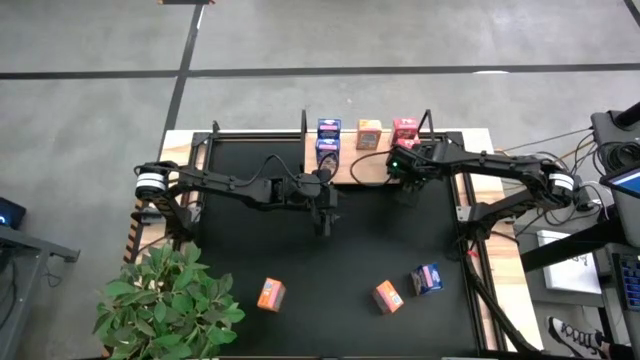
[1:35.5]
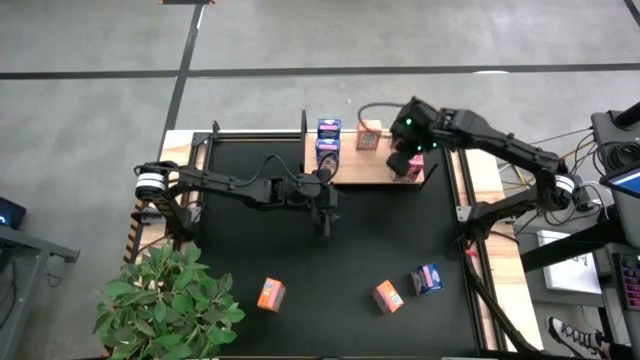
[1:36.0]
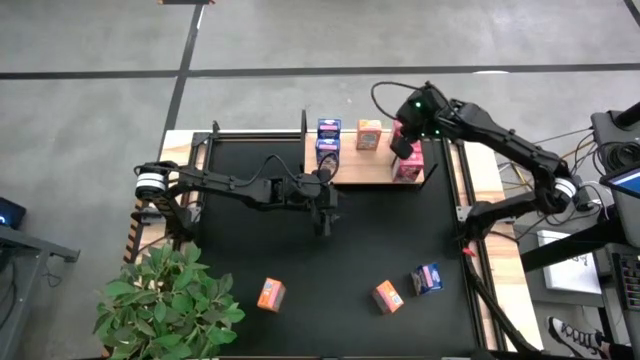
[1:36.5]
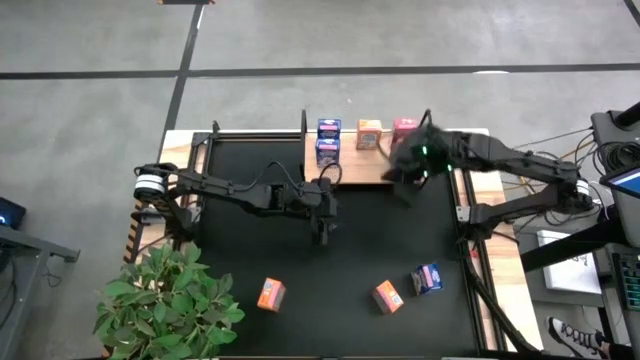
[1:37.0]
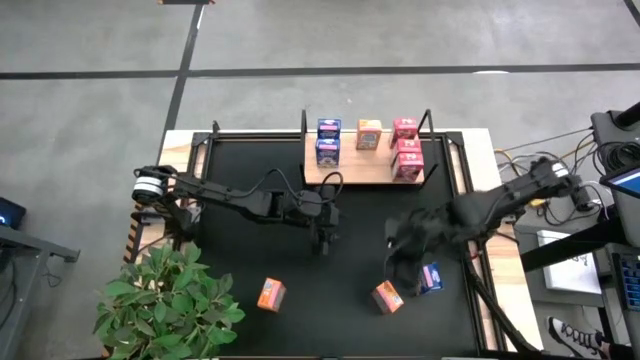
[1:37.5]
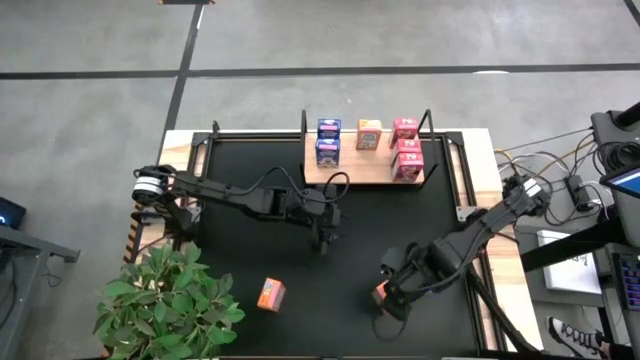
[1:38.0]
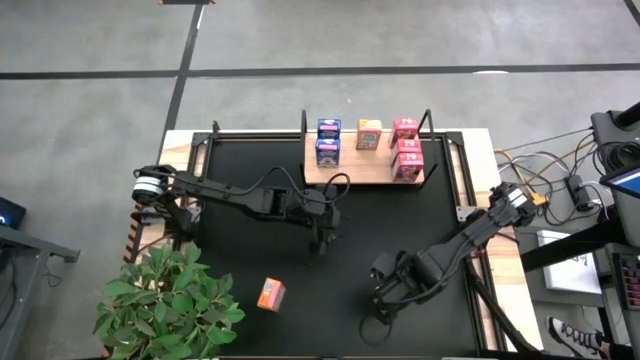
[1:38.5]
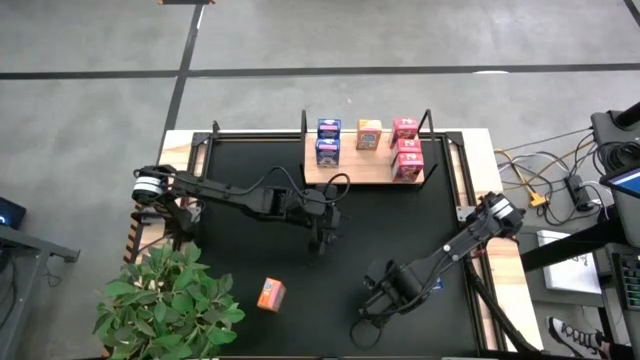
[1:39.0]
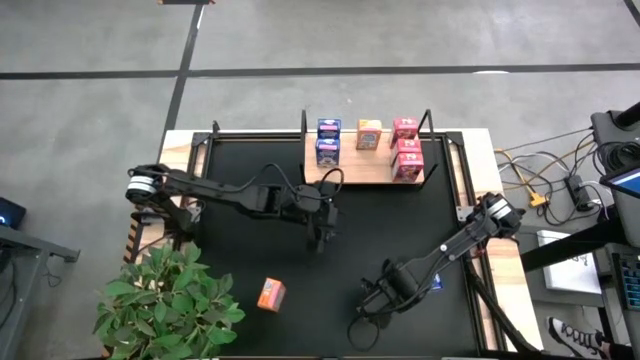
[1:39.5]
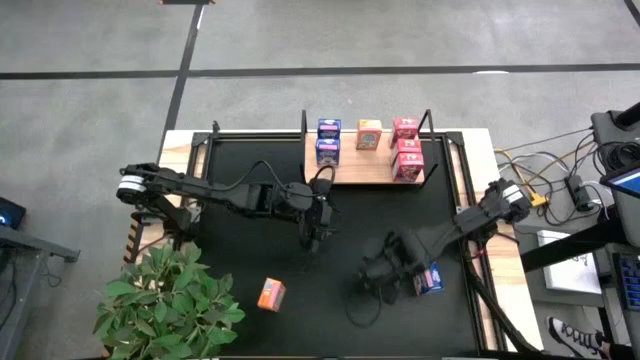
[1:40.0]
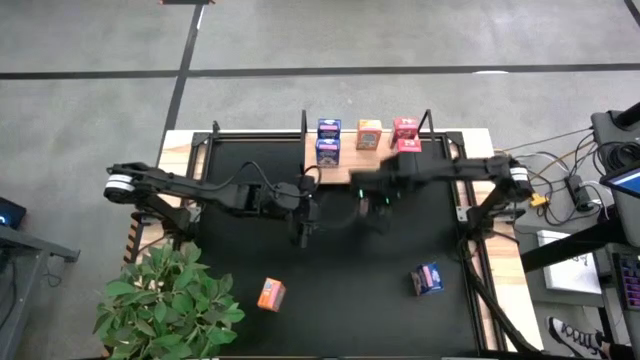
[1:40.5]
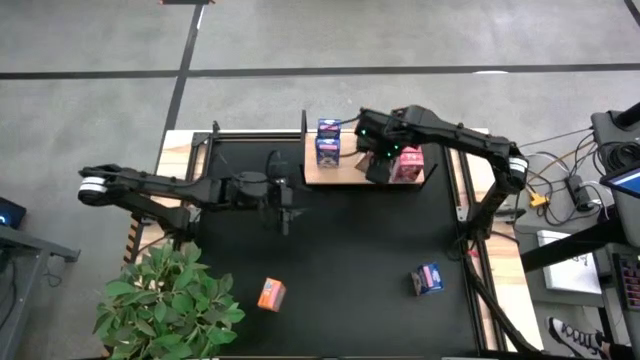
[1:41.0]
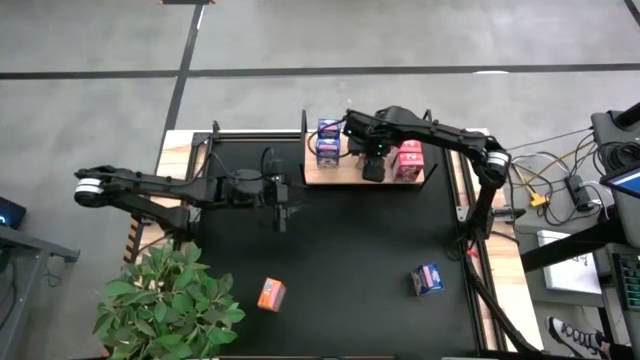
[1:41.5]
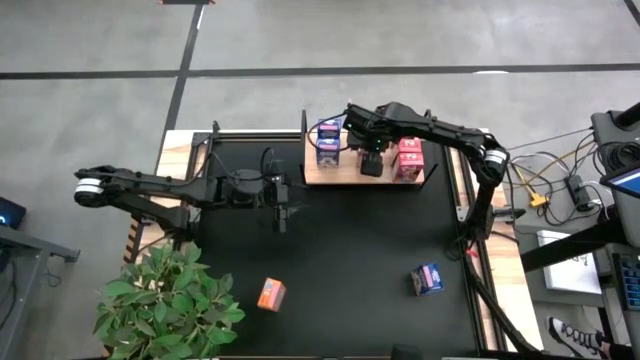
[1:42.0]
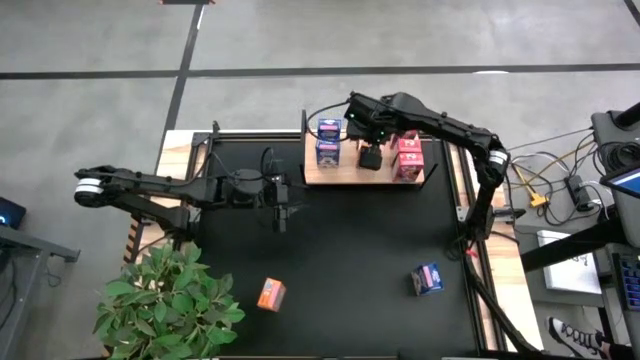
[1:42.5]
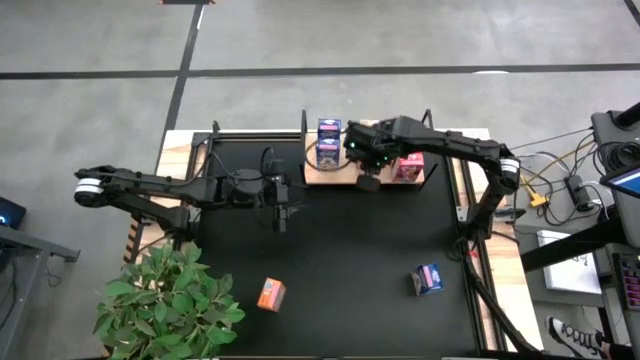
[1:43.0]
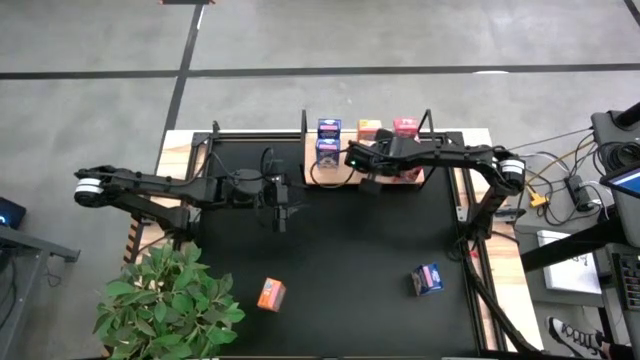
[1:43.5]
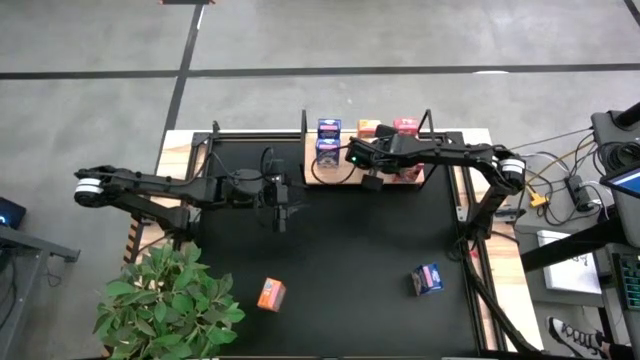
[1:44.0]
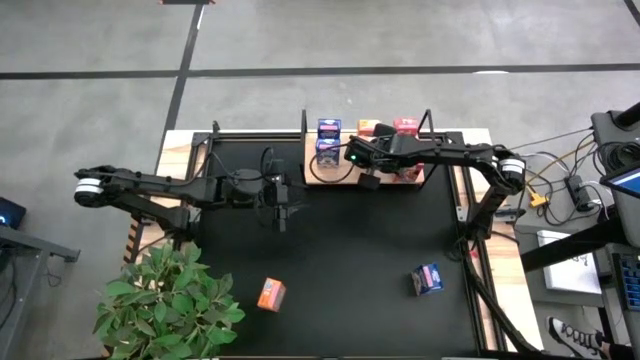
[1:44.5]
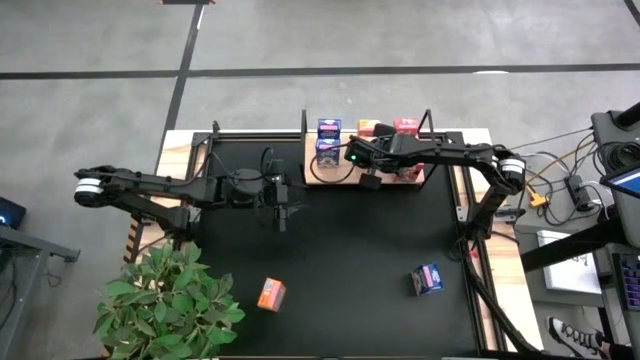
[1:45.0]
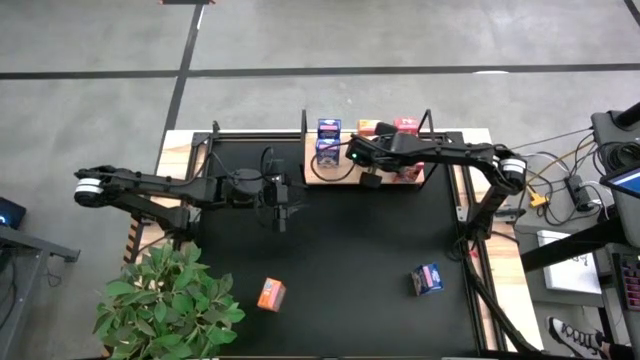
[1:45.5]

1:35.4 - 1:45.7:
Task: Stack cereal on shelf
Put the right orange cereal box on the shelf aligned with the other orange cereal box

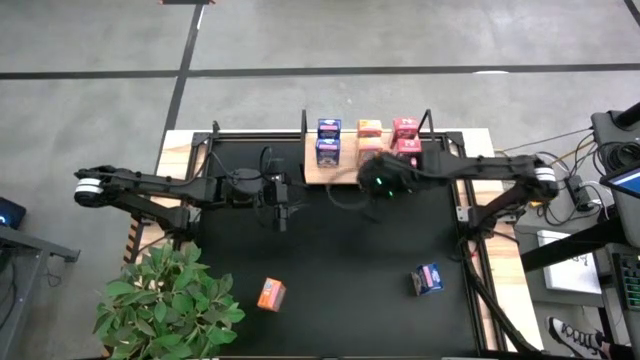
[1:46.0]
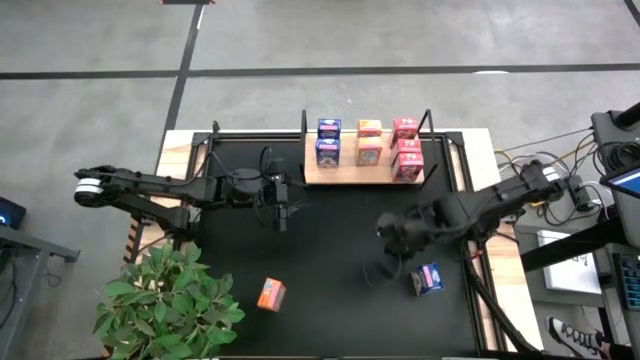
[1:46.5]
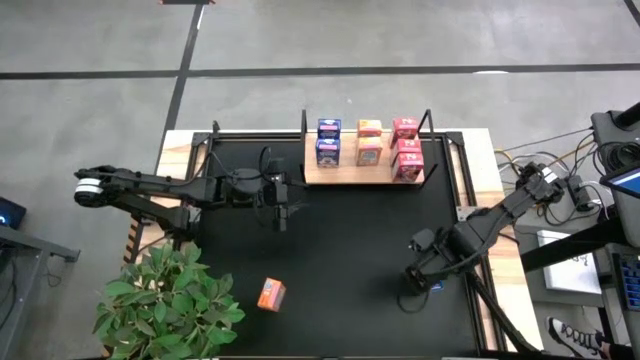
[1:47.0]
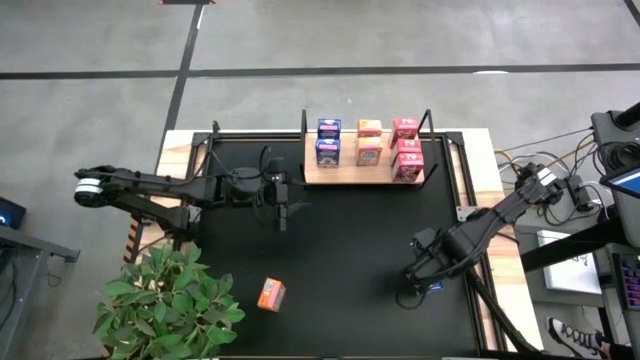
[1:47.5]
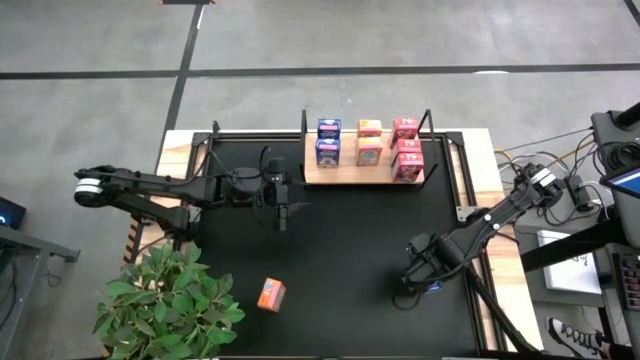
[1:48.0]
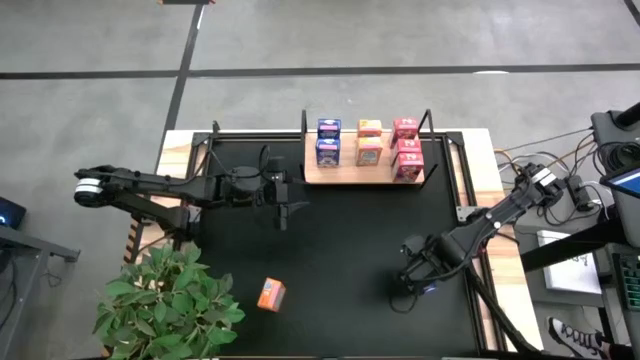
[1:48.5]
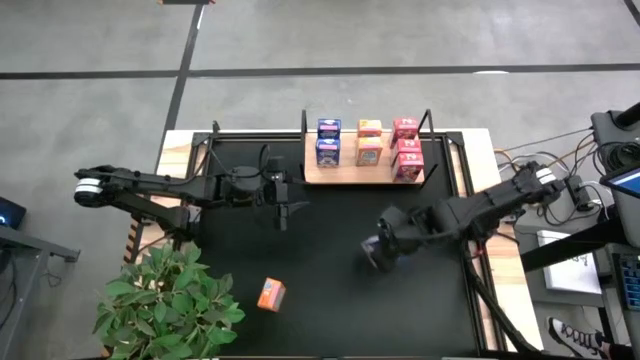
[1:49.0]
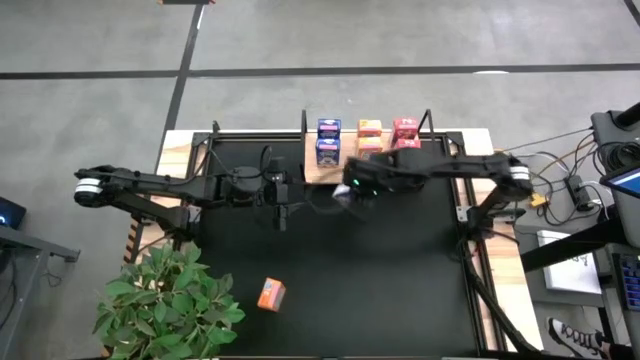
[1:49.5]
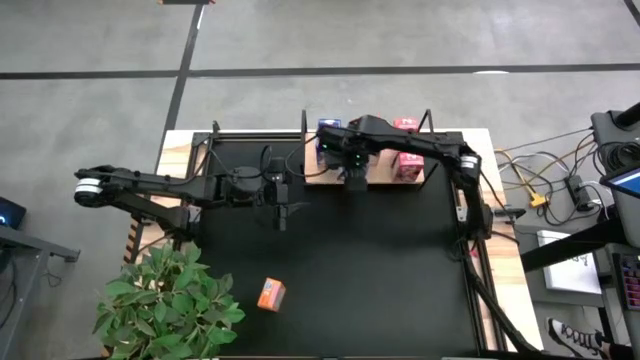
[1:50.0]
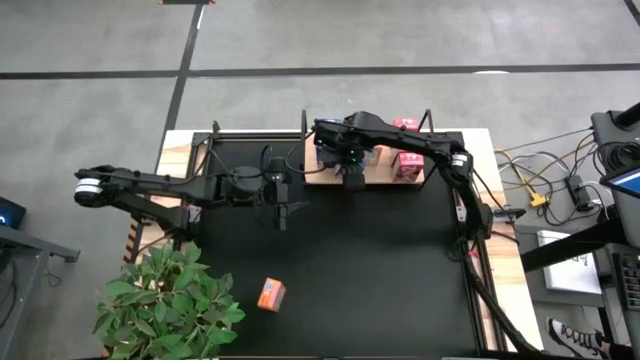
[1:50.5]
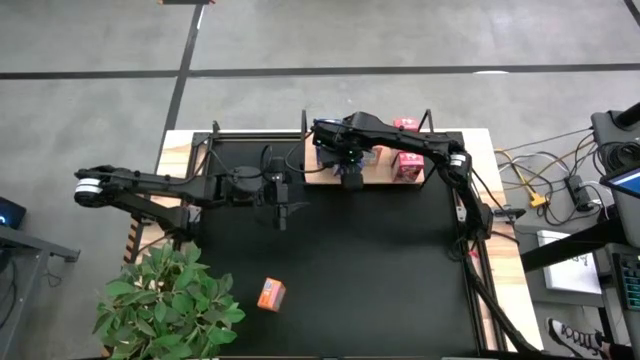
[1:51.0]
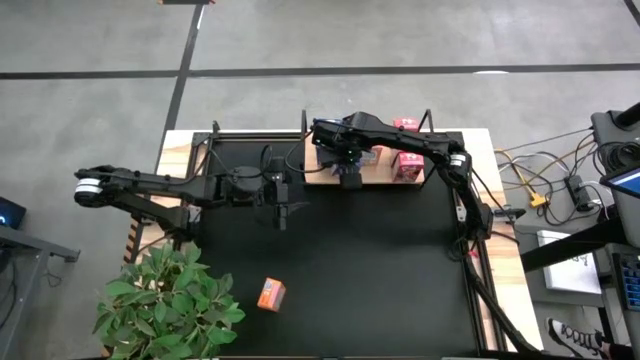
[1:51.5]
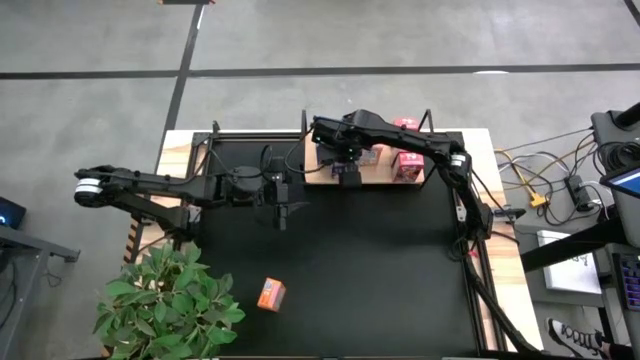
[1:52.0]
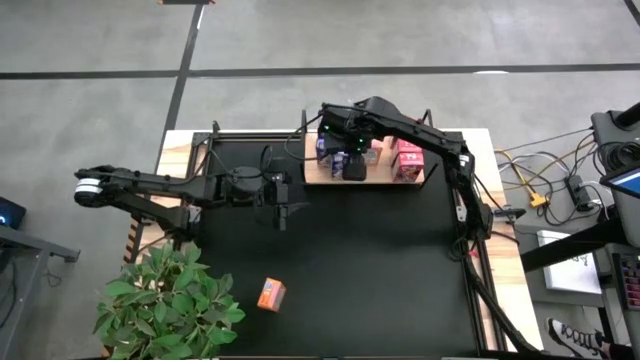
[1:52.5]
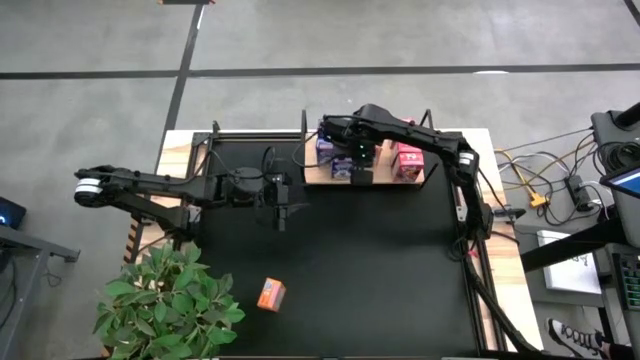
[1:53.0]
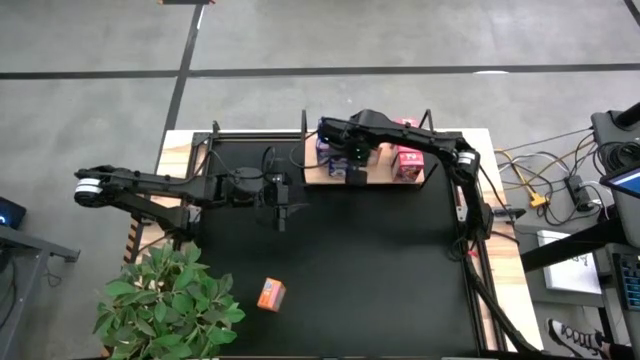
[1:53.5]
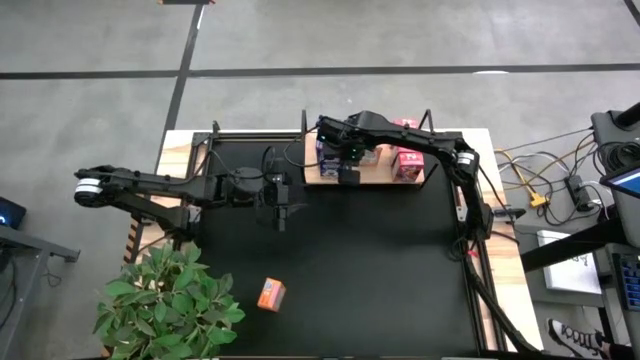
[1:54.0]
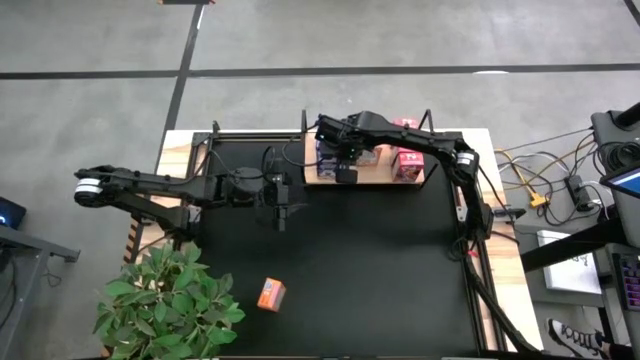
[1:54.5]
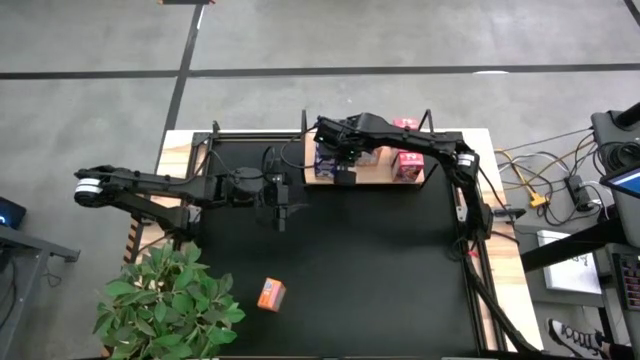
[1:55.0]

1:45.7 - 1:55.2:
Put the blue cereal box on the shelf aligned with the other blue cereal box

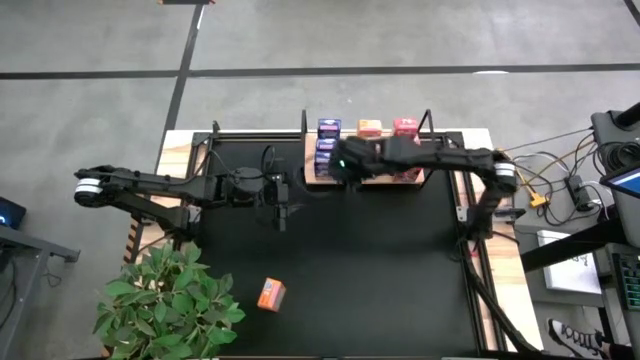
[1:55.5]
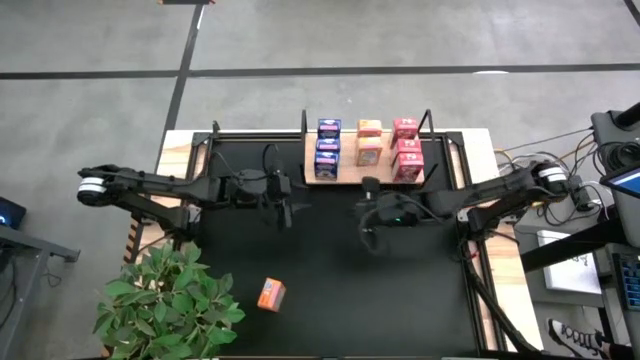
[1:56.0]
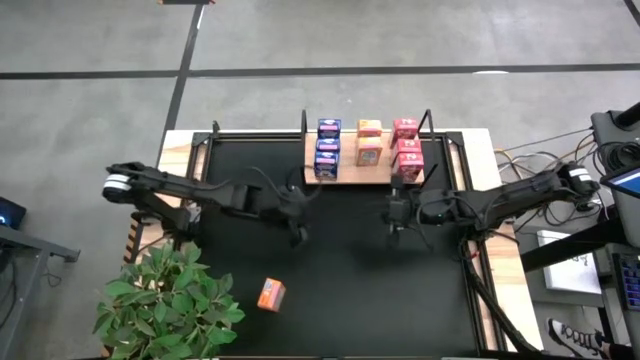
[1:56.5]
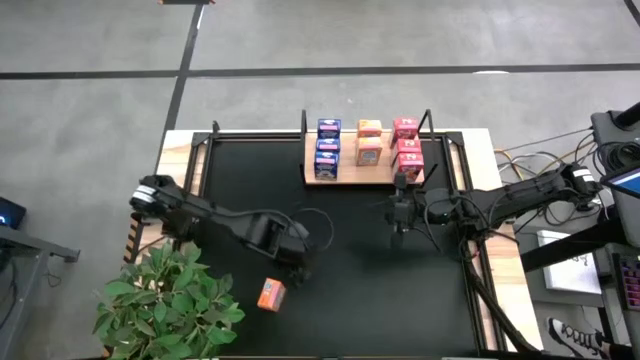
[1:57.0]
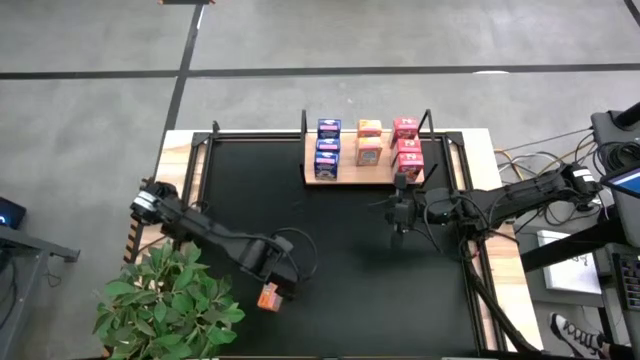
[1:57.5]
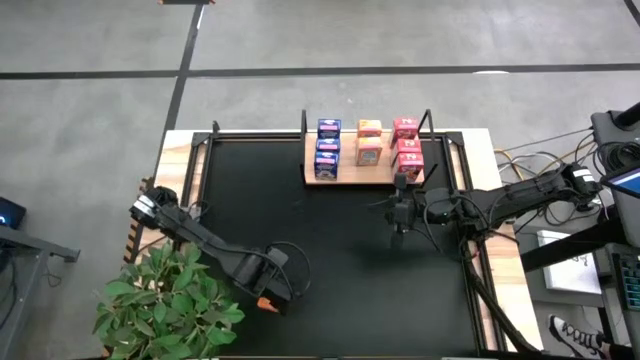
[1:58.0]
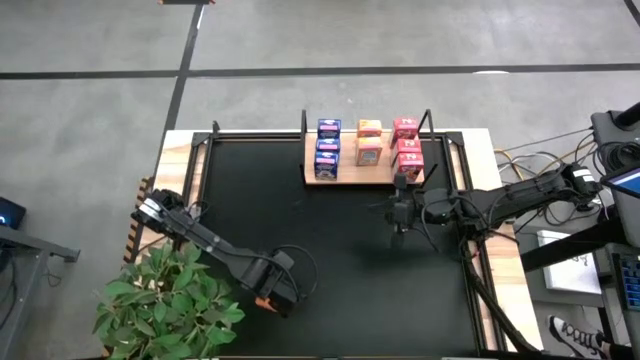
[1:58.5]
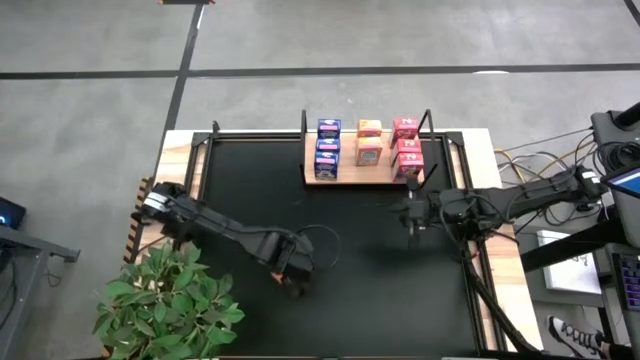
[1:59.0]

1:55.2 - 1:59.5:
Put the orange cereal box on the shelf aligned with the other orange cereal box
